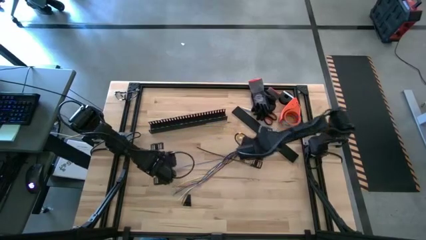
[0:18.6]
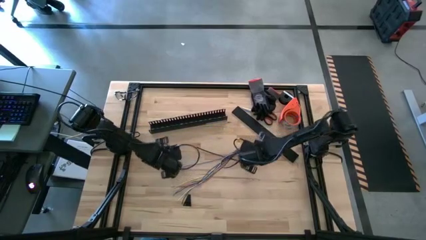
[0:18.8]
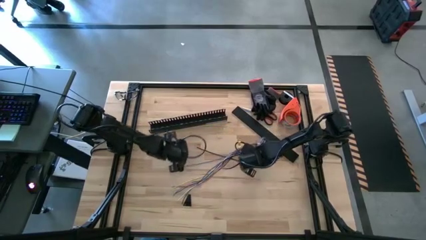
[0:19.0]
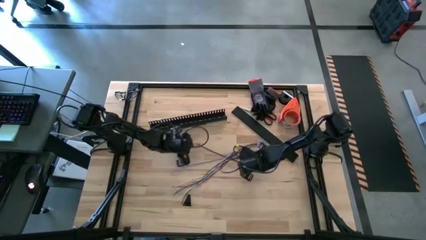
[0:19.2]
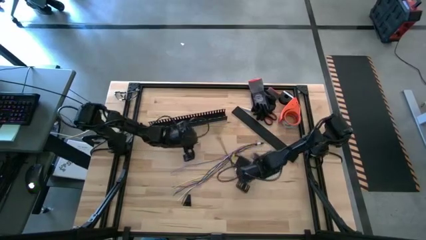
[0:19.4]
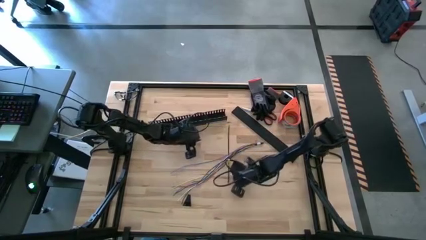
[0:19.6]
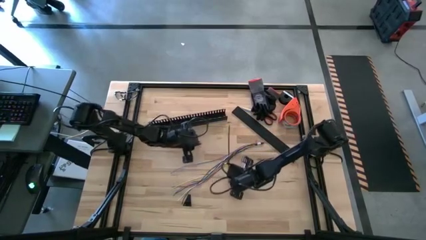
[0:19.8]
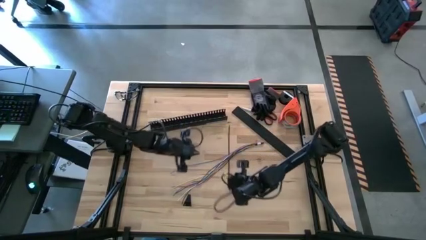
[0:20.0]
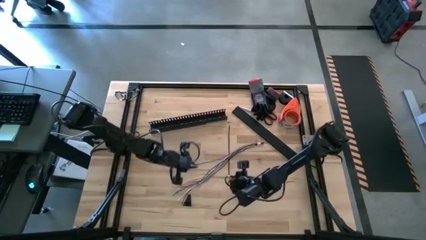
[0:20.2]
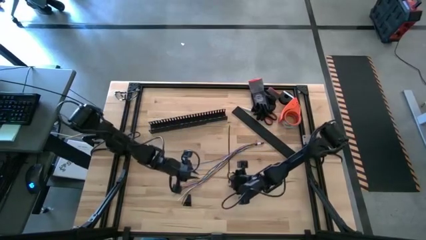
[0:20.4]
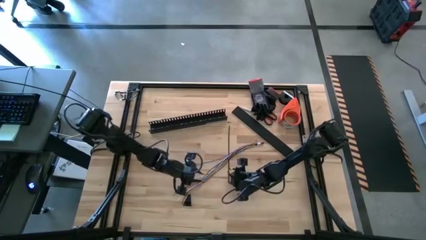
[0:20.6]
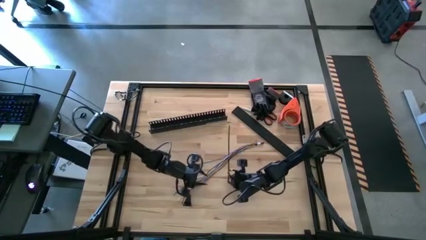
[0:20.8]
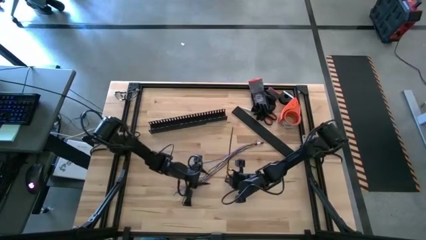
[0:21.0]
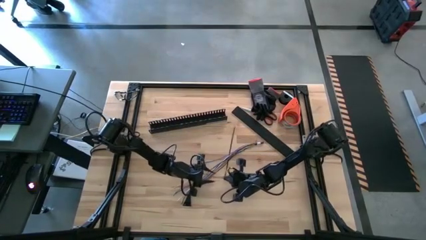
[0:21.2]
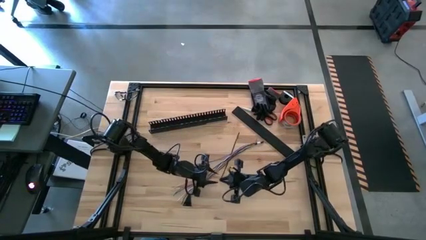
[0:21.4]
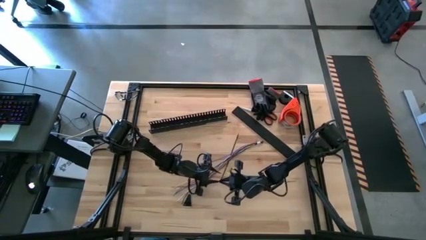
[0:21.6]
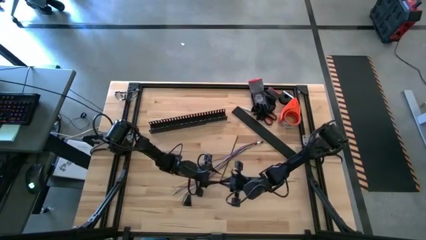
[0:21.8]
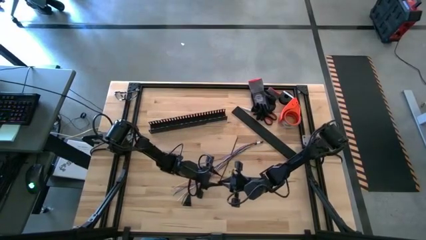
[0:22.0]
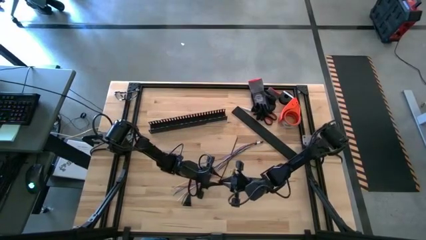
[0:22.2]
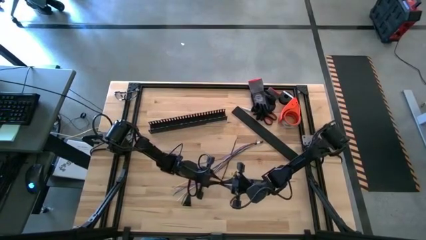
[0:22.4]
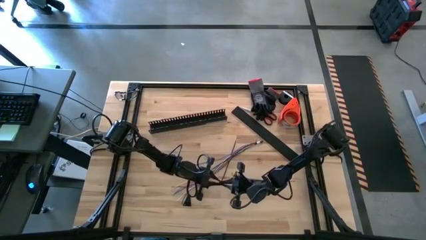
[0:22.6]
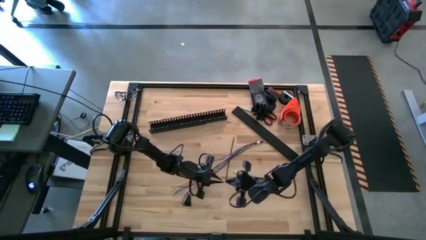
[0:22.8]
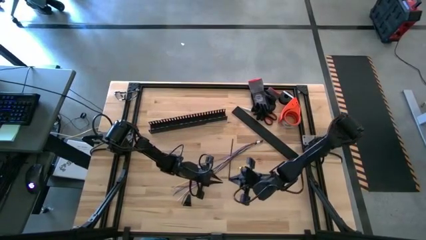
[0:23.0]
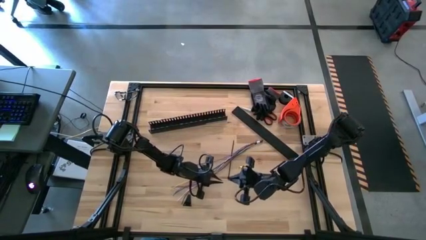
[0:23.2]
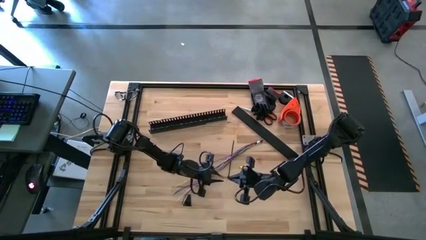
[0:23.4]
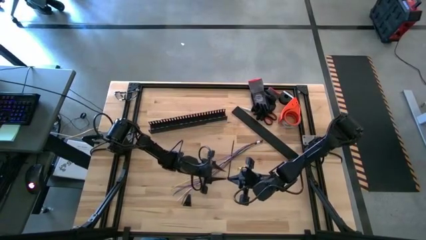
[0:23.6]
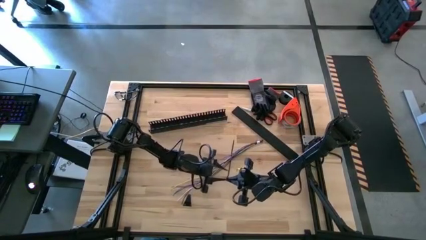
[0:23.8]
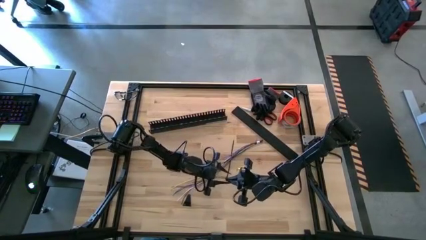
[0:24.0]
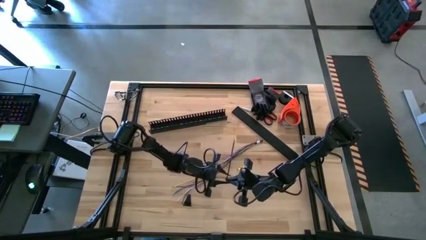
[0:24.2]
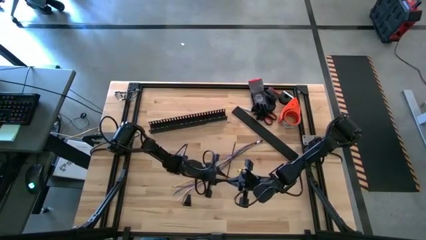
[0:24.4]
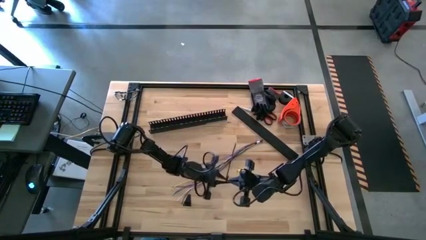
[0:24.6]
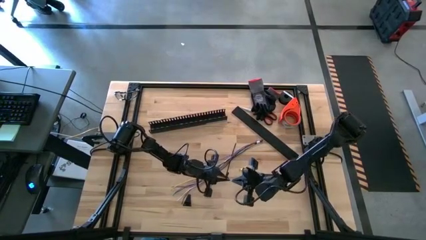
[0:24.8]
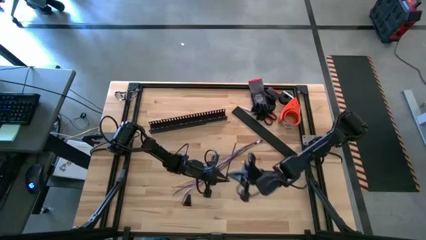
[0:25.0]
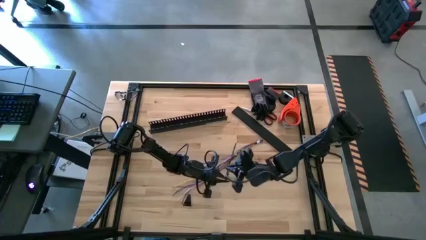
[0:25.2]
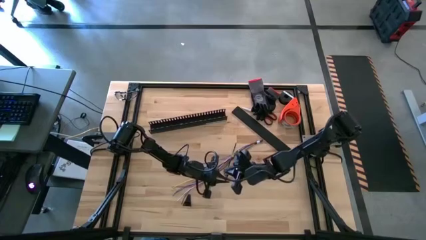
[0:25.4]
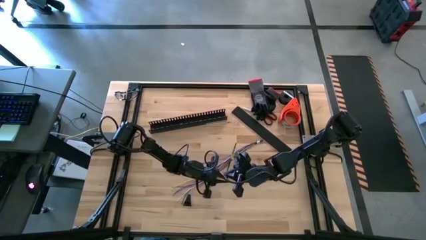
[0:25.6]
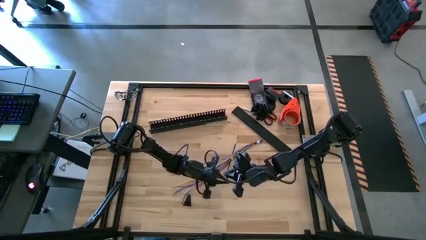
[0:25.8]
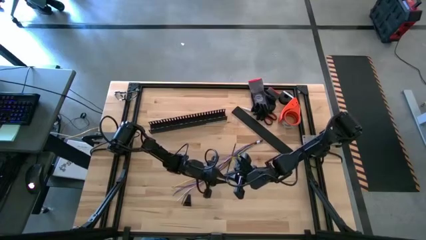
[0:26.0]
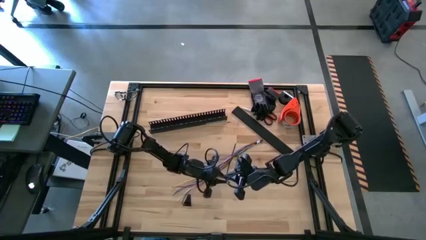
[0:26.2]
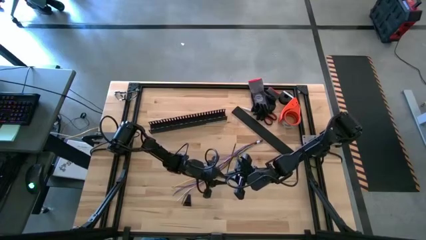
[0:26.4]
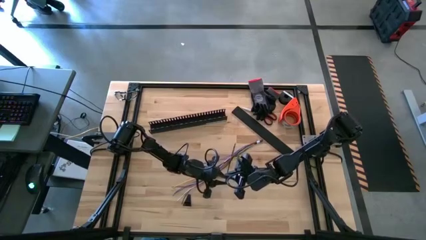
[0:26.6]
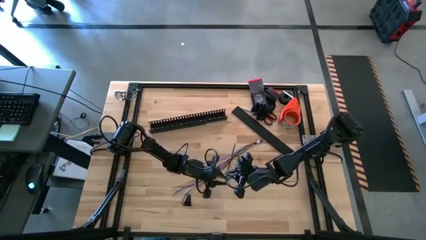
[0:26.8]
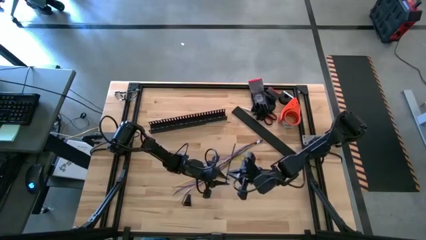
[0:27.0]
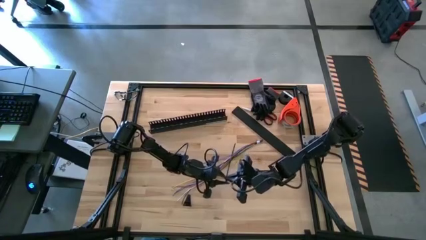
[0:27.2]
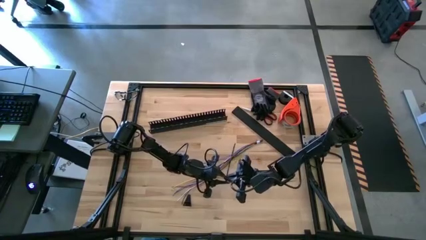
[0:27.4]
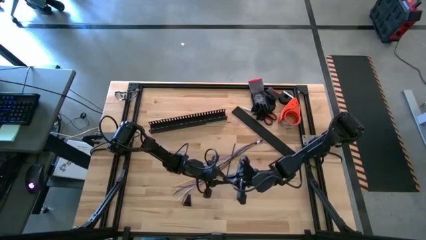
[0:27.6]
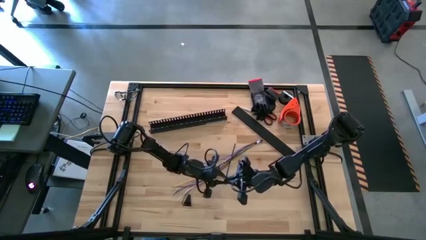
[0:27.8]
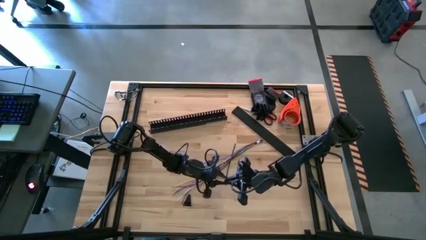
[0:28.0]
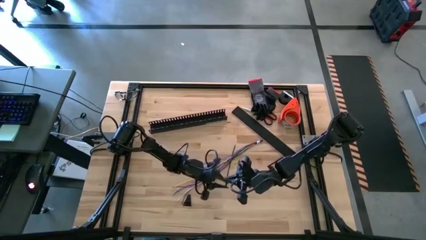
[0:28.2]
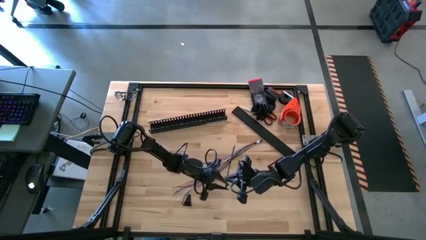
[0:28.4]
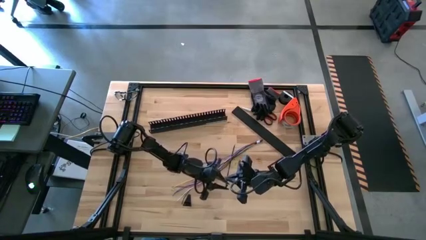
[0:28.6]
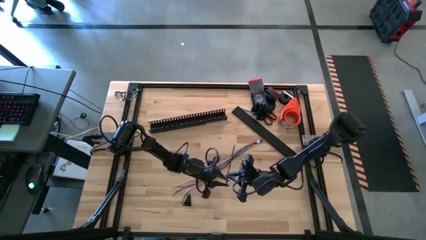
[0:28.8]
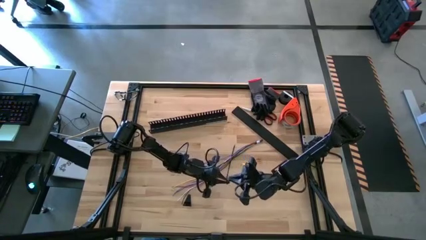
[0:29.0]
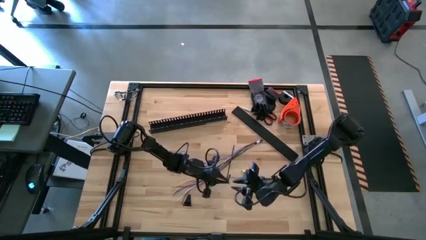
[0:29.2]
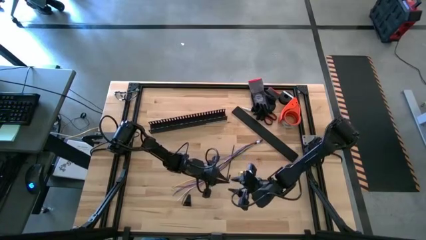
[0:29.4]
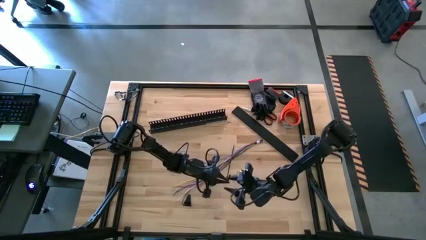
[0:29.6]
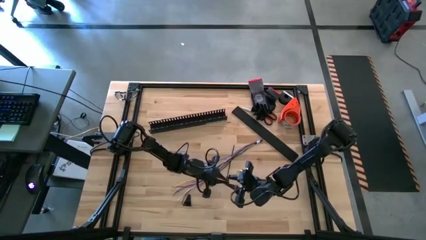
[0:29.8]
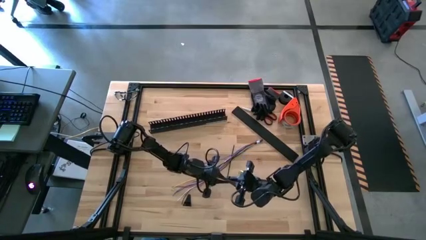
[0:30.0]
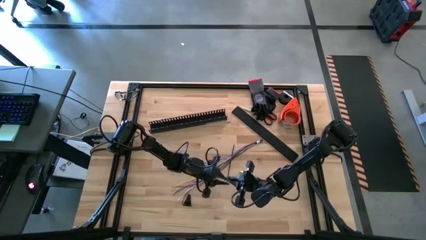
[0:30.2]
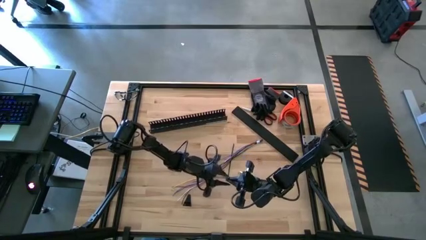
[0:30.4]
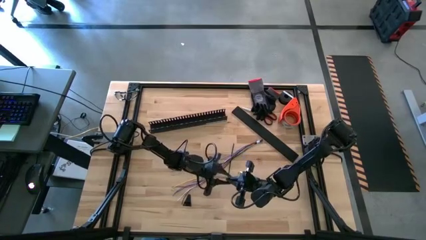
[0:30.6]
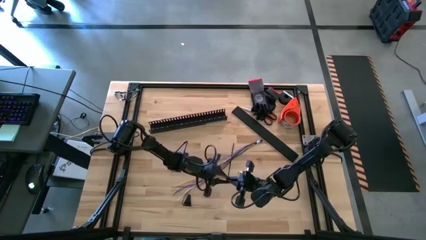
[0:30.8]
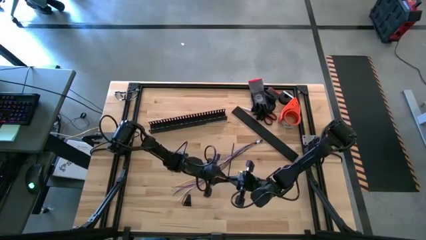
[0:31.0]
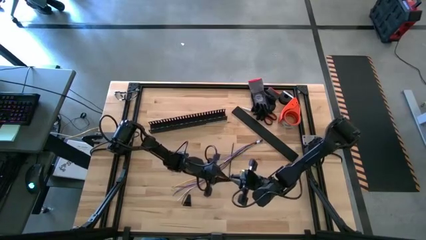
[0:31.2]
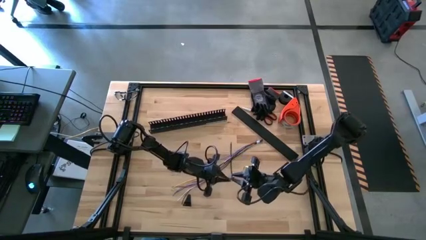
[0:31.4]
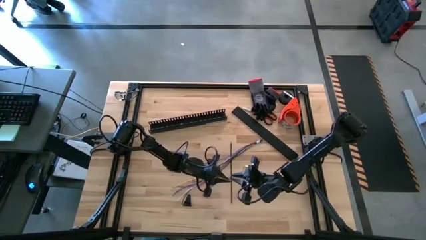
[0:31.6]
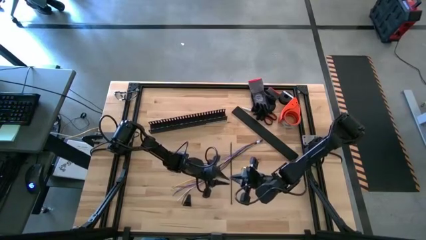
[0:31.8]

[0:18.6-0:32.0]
Task: Ziptie cables
Wrap the colored cables together using a zip tie

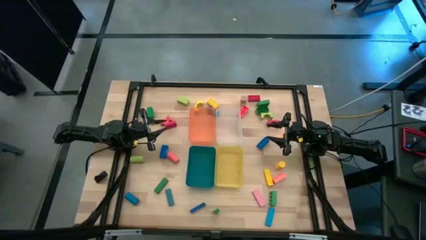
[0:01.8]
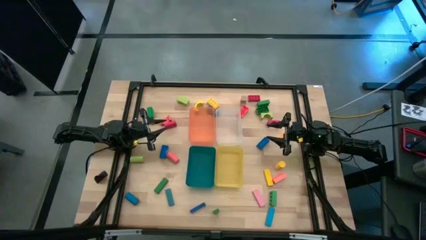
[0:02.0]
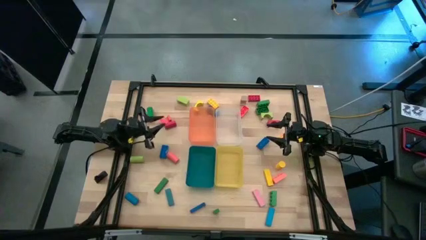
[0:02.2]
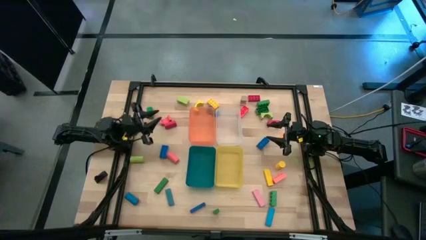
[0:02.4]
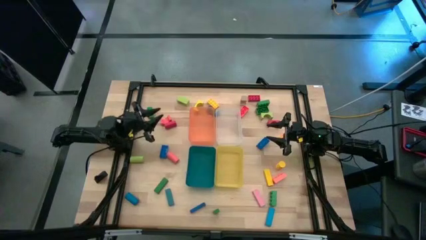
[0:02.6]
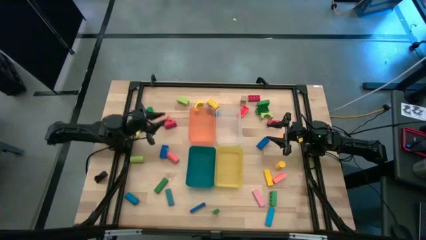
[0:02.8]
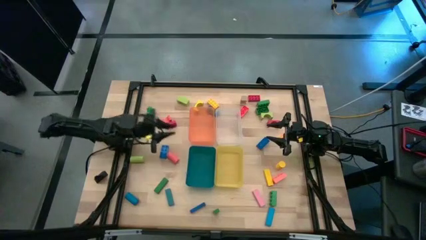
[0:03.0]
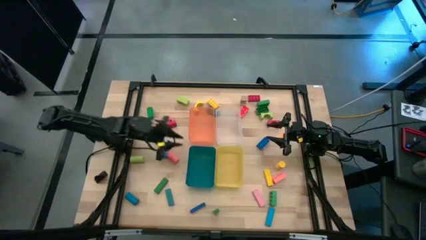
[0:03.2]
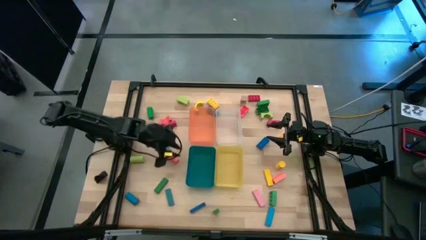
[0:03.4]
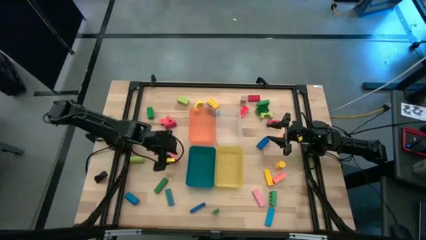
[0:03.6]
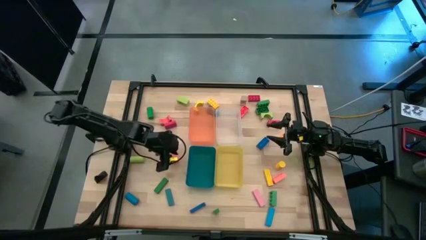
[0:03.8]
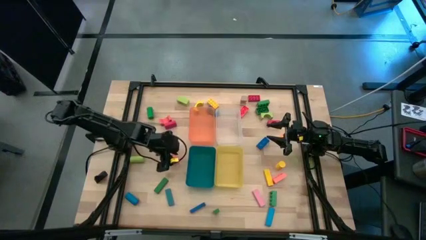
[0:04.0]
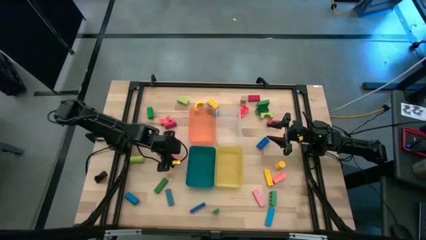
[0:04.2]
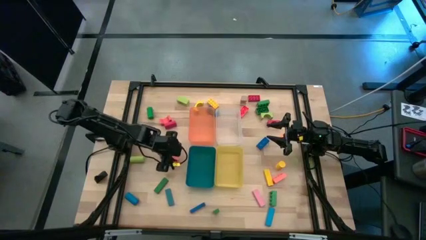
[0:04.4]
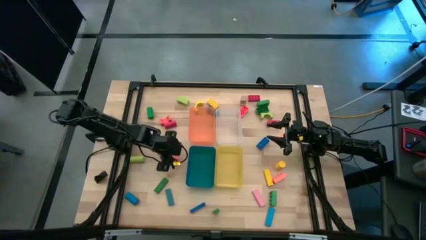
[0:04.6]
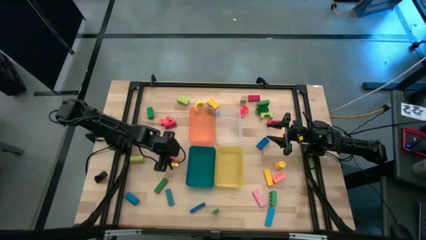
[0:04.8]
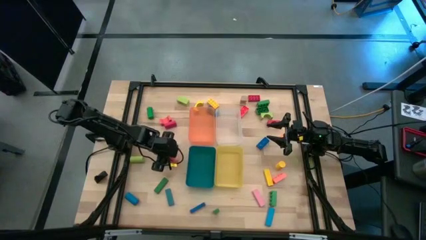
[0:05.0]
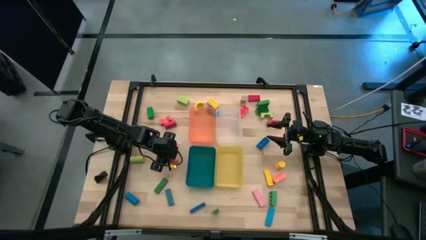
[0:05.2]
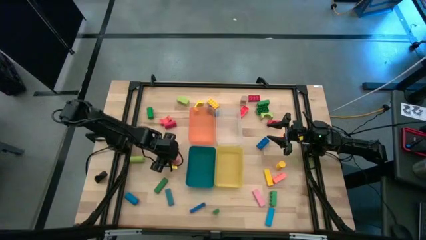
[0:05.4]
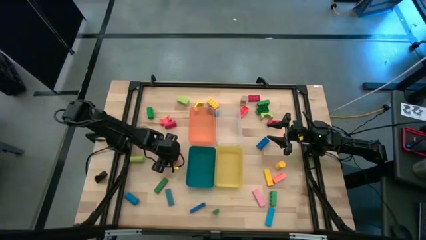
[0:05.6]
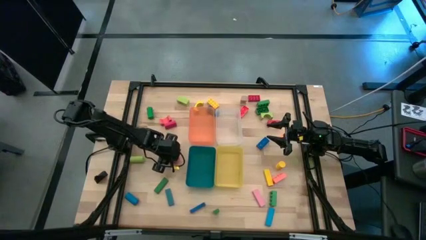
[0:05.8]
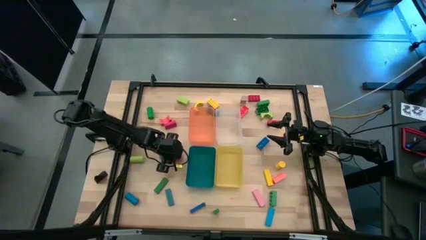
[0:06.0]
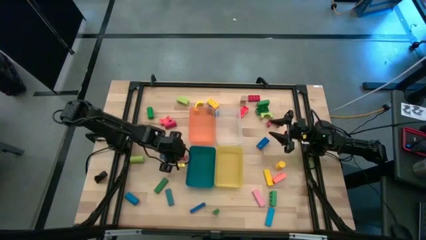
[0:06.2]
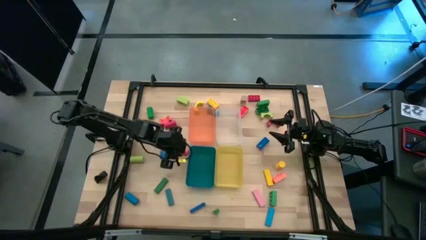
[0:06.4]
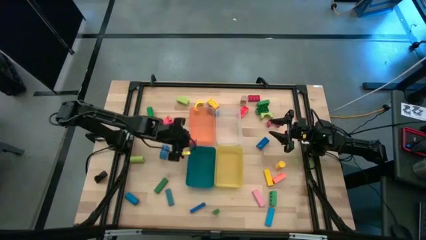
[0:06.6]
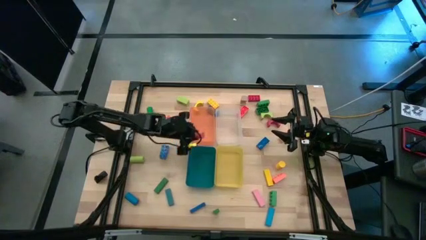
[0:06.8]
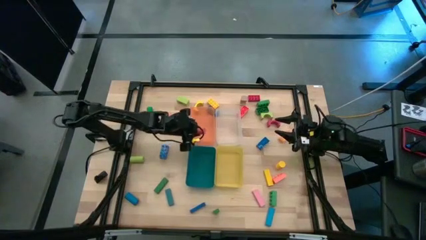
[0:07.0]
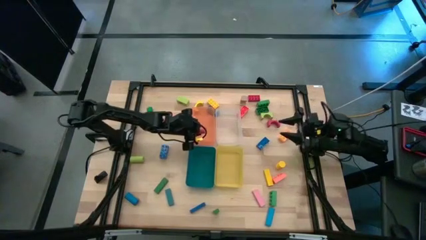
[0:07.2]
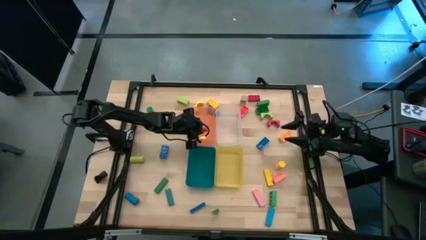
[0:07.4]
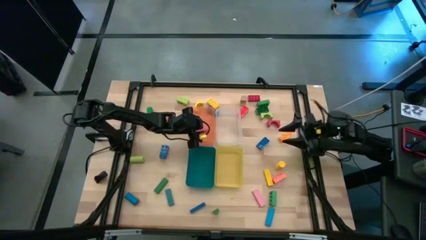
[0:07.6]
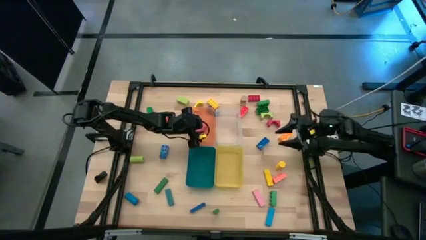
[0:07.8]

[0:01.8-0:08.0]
Task: Sort blocks by size
Put the orange cylindrical block into the orange bin
